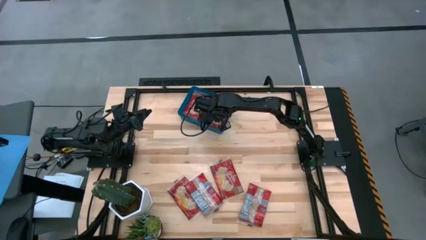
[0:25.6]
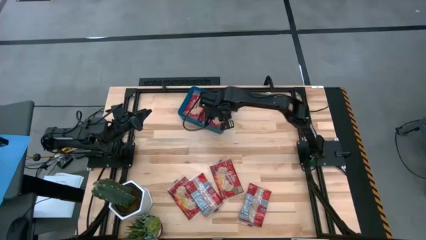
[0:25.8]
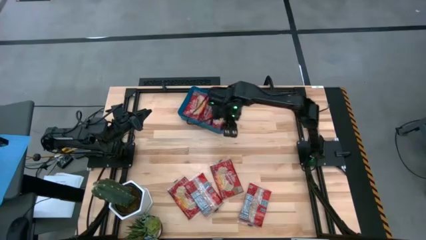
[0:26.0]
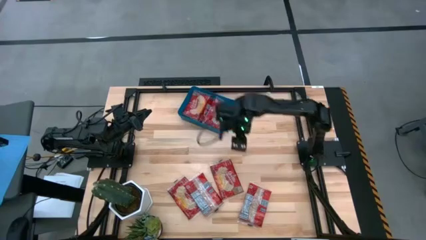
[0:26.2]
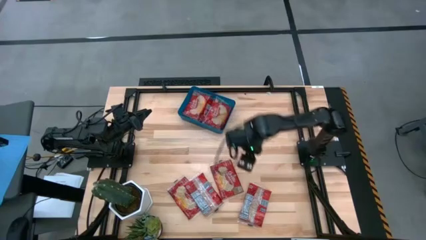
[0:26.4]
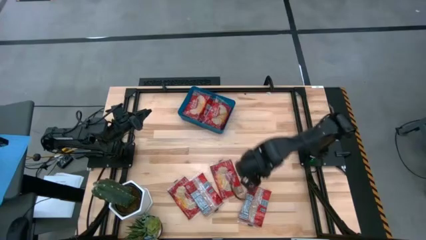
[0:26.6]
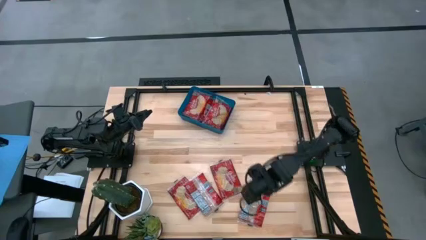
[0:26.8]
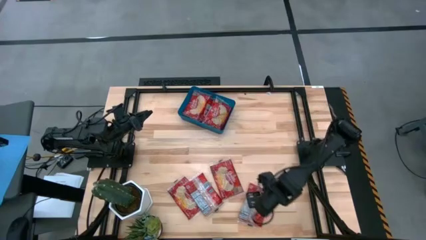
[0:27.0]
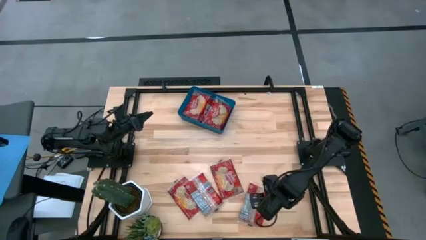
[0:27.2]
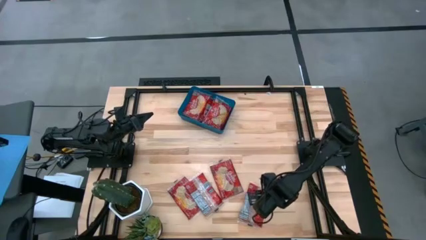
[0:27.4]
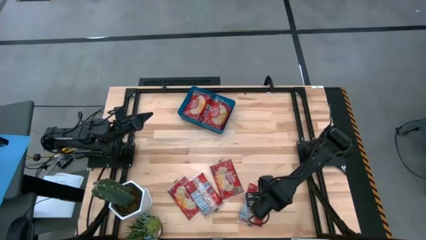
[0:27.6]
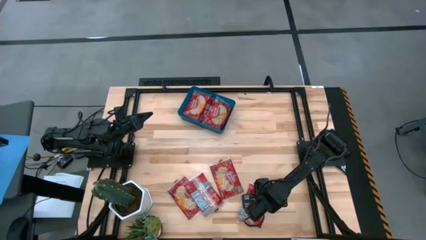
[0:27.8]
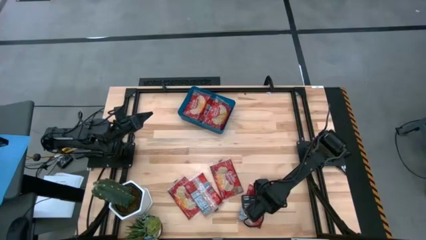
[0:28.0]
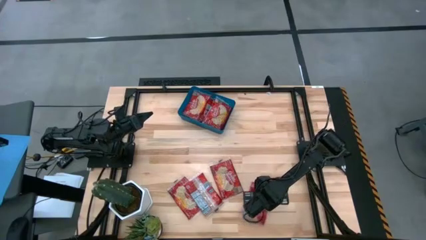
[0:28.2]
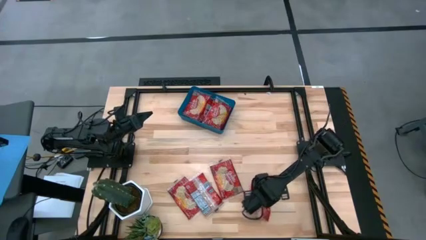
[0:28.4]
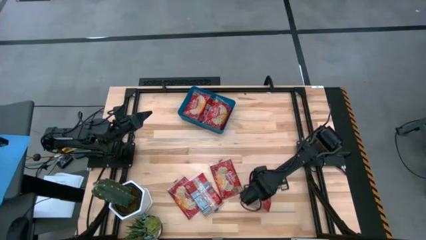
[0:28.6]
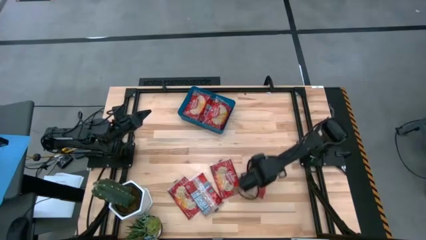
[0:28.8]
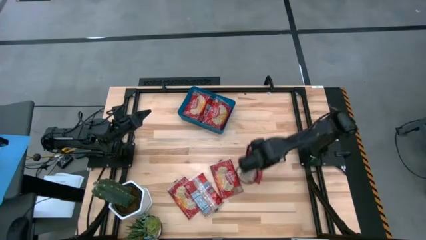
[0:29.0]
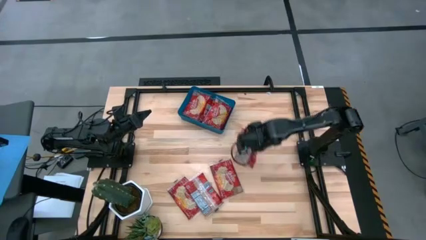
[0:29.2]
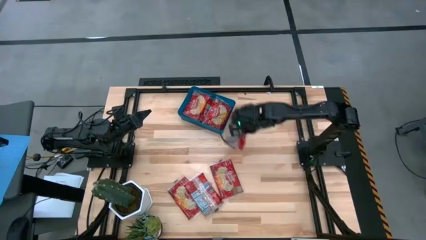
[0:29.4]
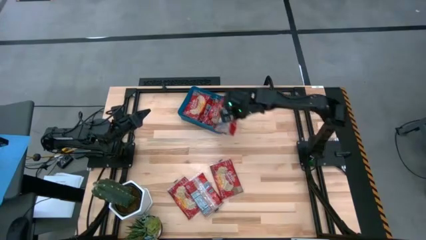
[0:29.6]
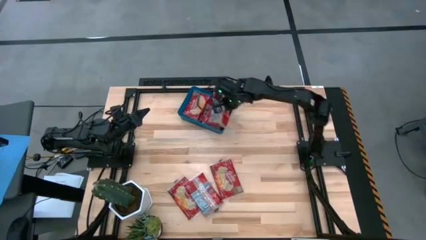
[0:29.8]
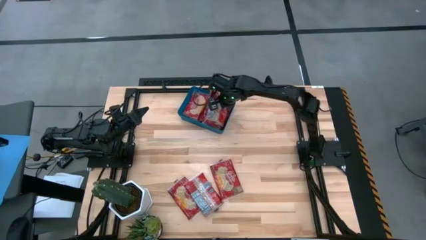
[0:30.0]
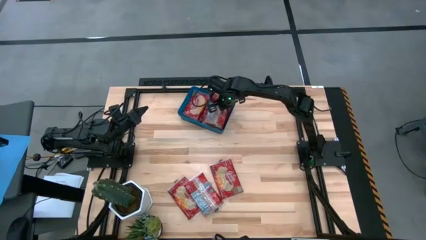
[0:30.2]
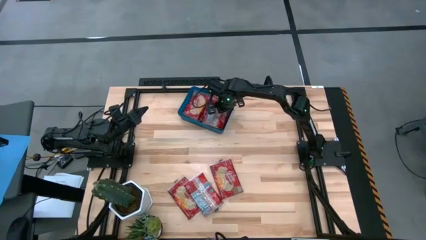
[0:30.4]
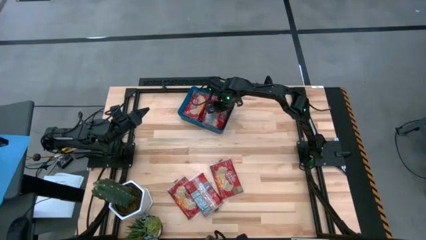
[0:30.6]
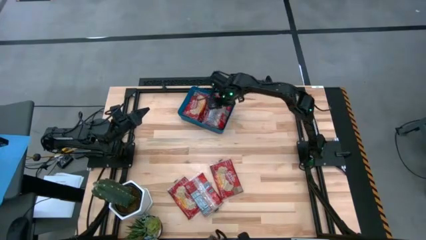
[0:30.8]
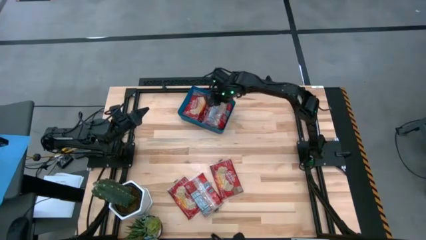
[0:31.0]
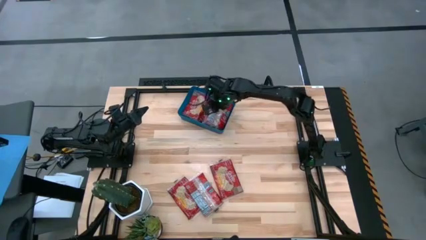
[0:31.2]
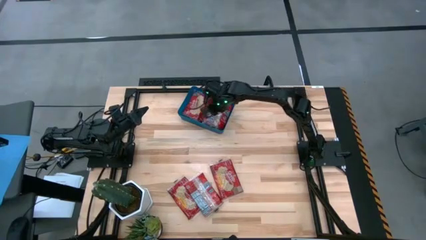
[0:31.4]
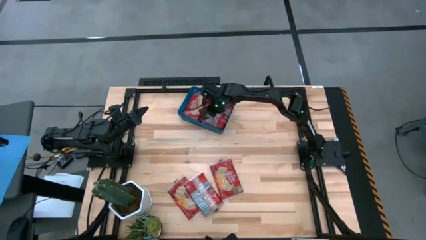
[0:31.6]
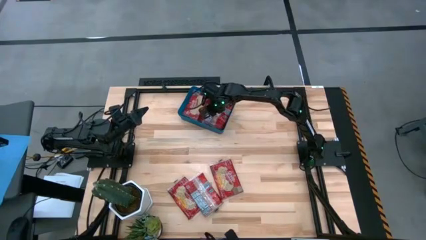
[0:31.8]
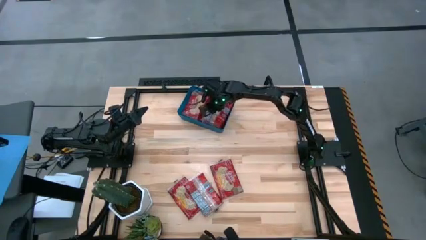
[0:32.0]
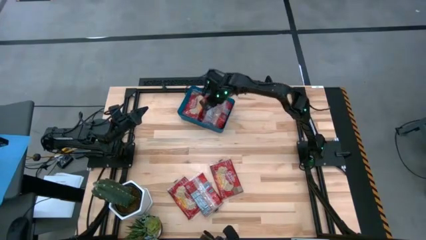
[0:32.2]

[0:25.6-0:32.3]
Task: Sort popcorn bags into baskets
Put the red popcorn bag into the blue bin

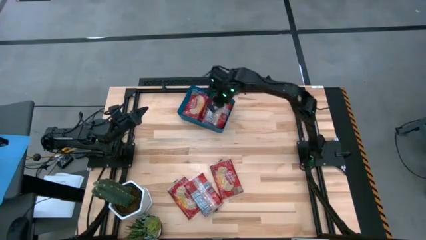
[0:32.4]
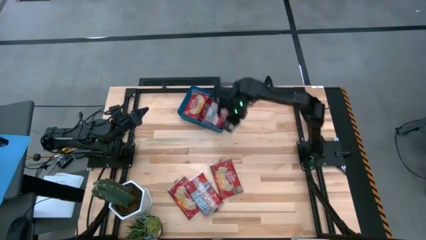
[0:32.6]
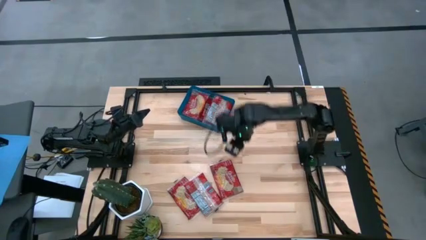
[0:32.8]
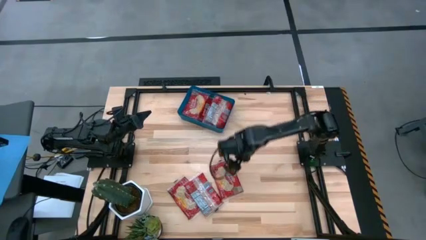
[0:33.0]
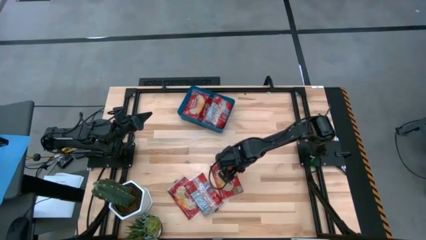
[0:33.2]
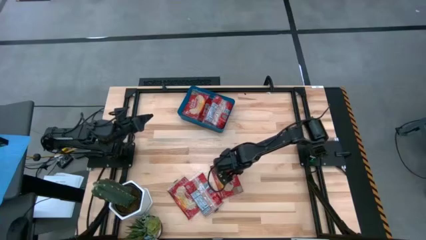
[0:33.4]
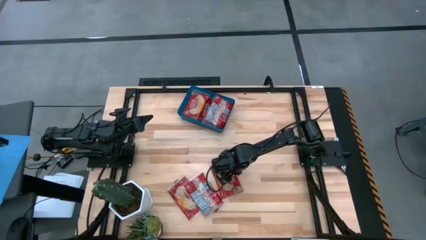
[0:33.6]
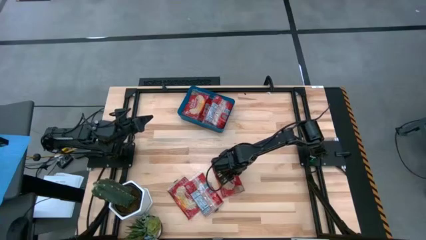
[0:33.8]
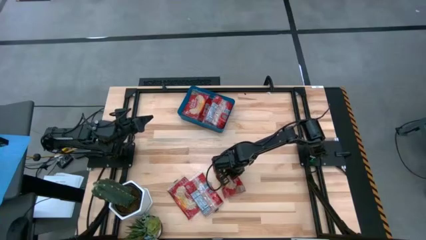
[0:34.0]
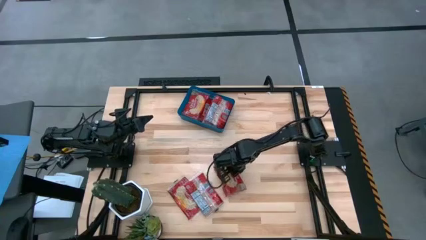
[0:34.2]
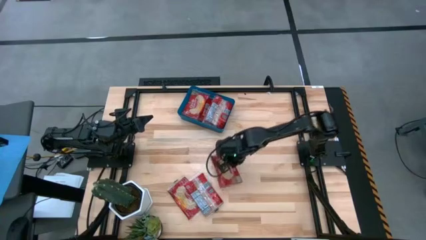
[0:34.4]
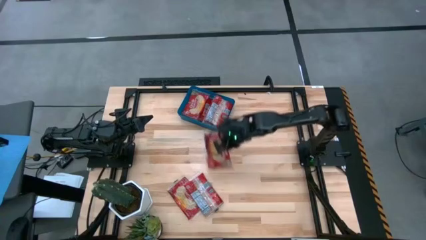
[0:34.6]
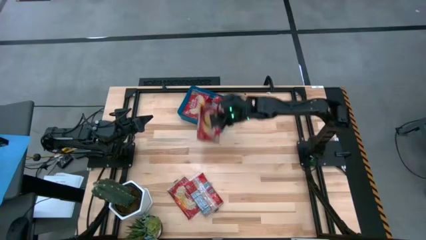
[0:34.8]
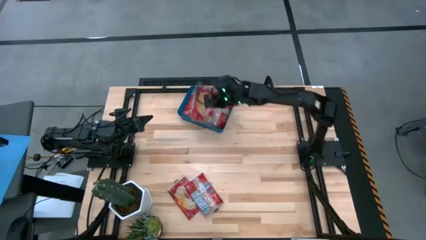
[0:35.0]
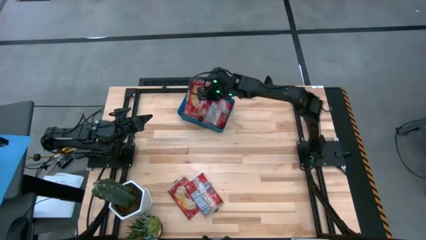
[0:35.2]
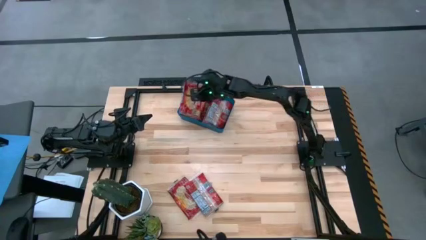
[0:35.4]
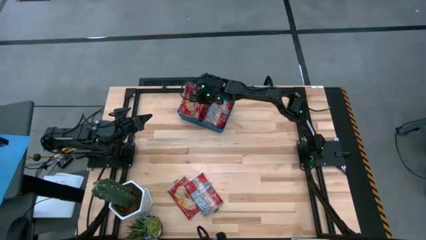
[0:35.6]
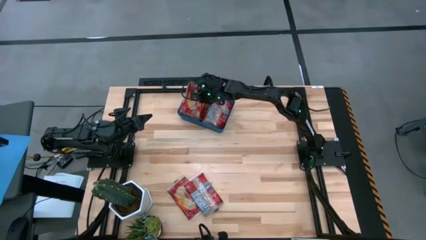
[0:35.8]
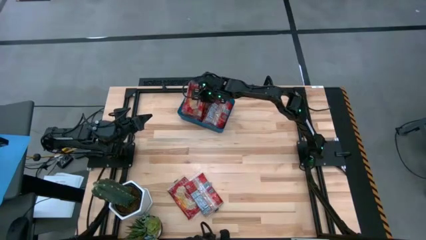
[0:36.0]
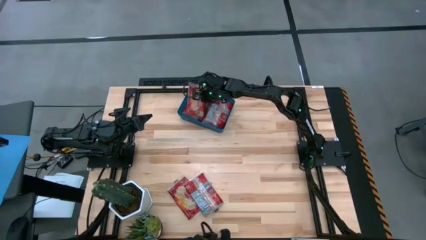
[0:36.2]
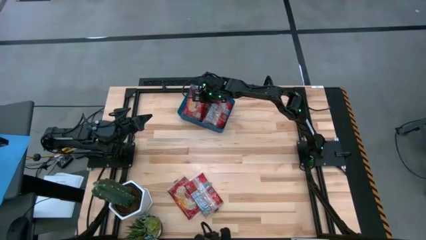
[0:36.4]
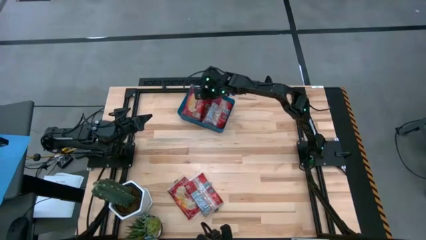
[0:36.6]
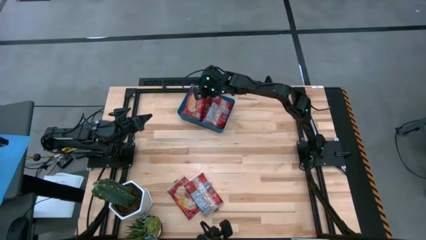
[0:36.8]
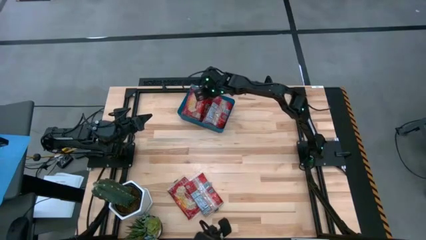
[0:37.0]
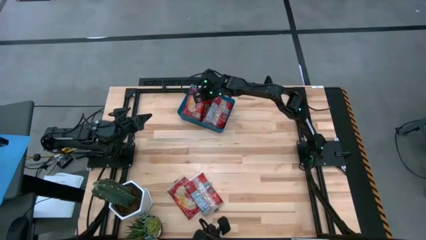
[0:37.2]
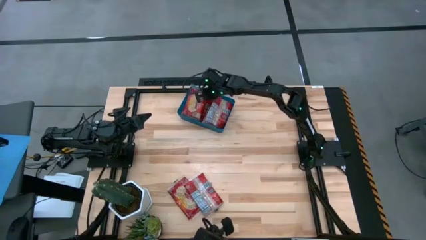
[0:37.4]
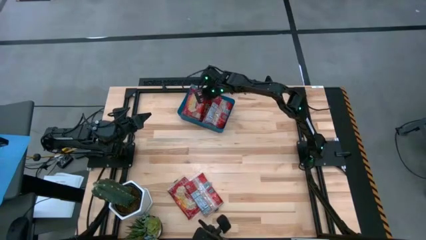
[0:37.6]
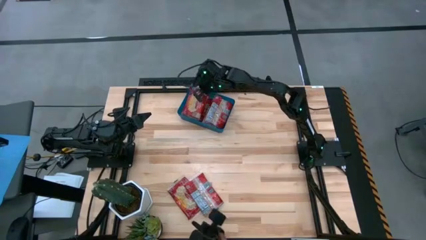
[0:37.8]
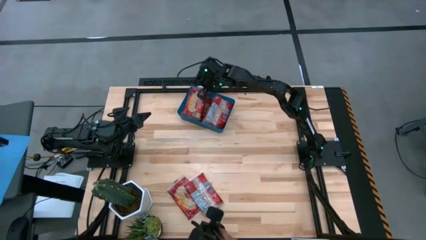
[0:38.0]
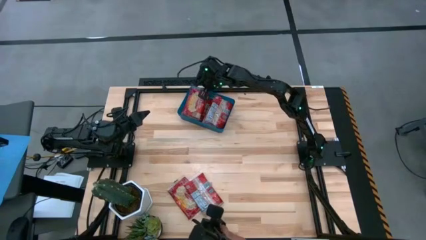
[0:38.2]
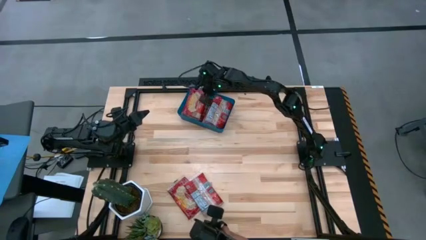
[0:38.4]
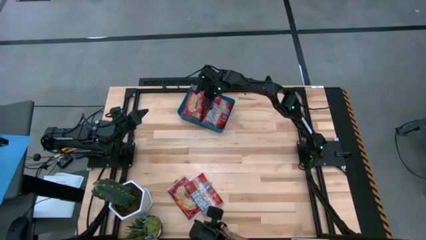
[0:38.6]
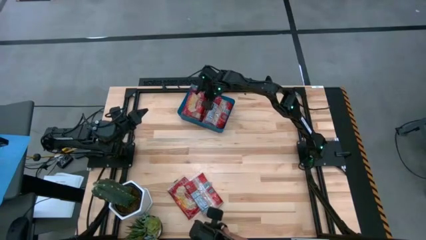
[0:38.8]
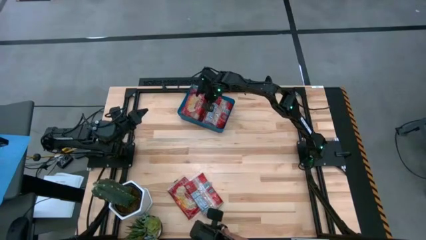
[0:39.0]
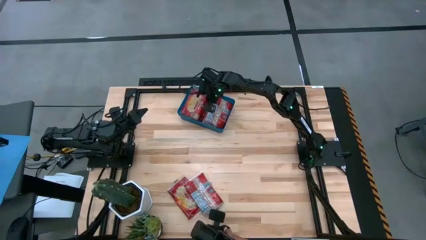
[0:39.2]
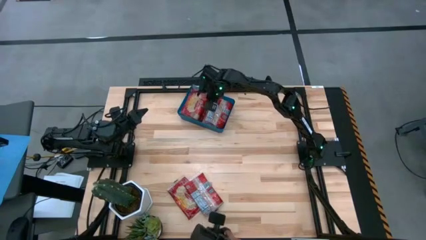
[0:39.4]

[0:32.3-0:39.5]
Put the red popcorn bag into the blue bin

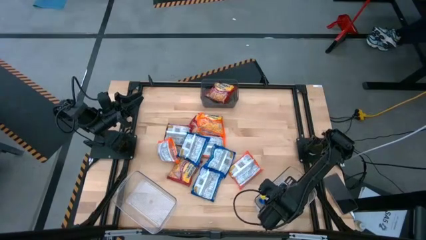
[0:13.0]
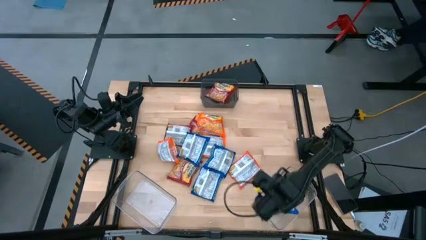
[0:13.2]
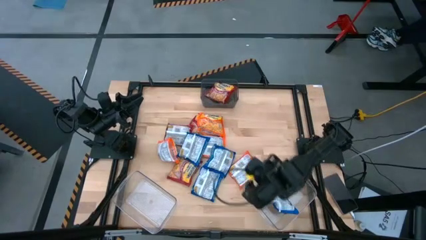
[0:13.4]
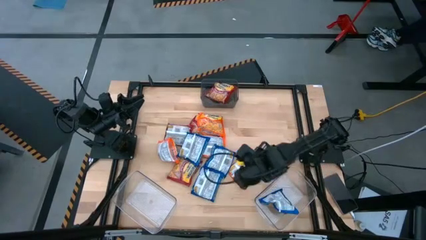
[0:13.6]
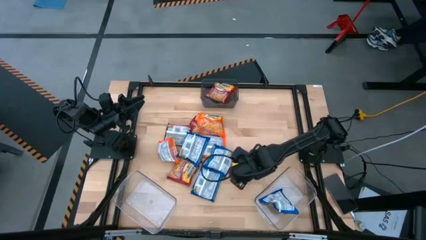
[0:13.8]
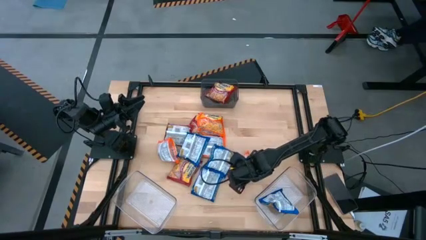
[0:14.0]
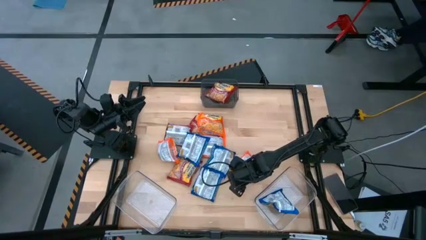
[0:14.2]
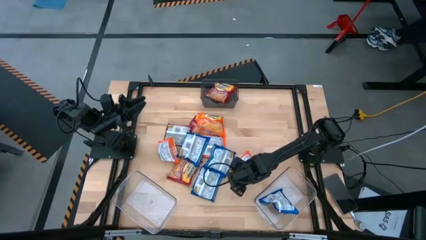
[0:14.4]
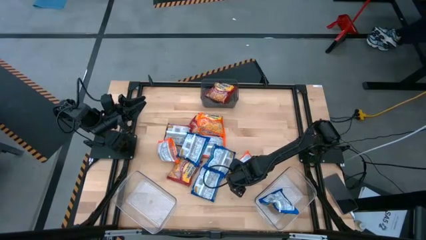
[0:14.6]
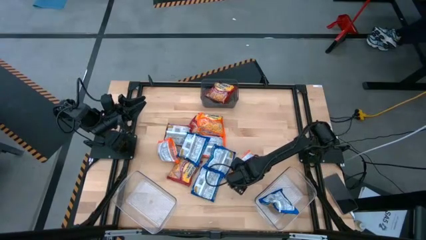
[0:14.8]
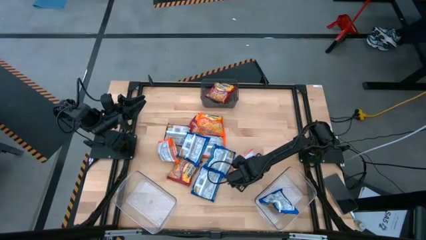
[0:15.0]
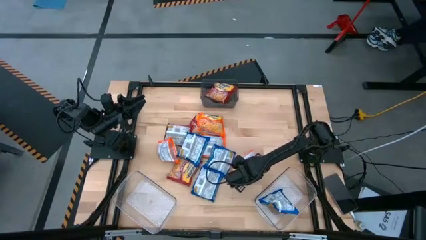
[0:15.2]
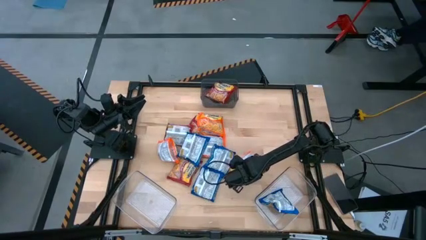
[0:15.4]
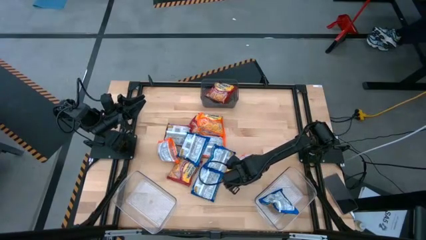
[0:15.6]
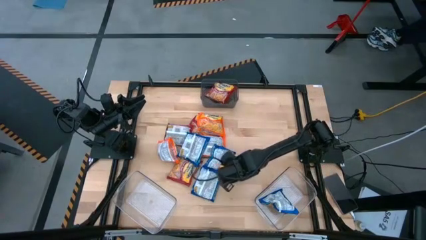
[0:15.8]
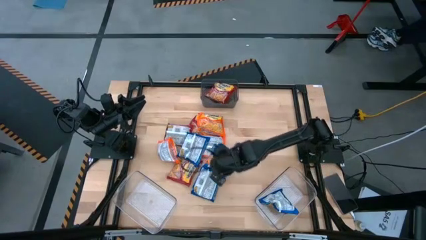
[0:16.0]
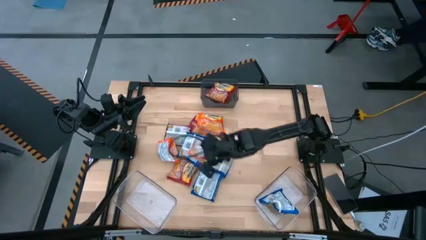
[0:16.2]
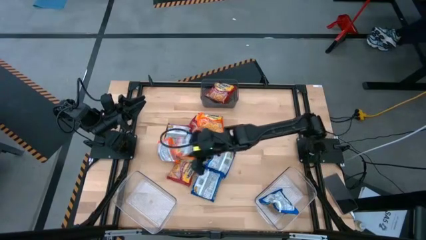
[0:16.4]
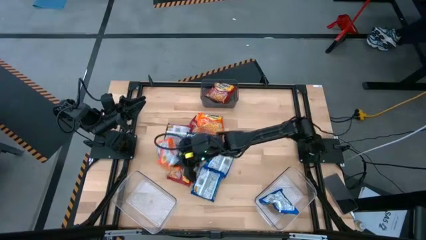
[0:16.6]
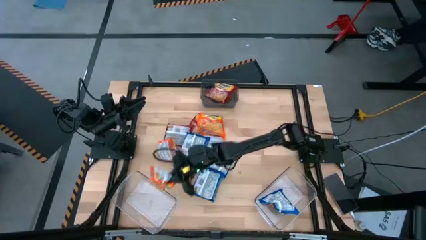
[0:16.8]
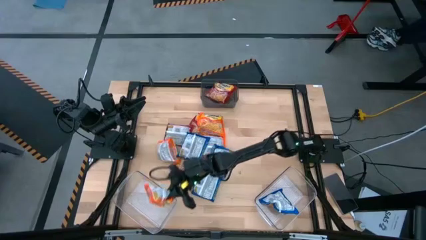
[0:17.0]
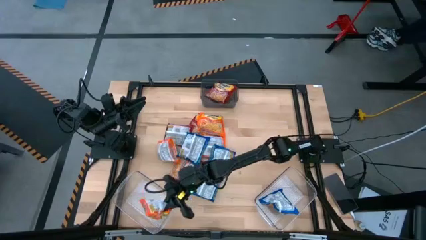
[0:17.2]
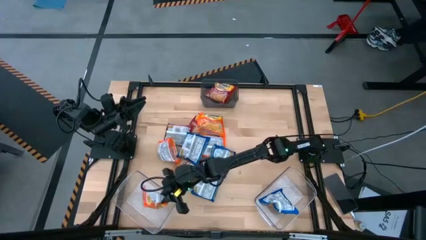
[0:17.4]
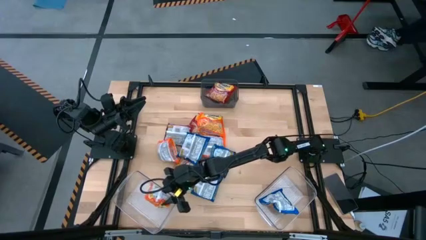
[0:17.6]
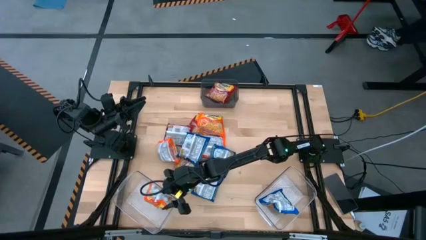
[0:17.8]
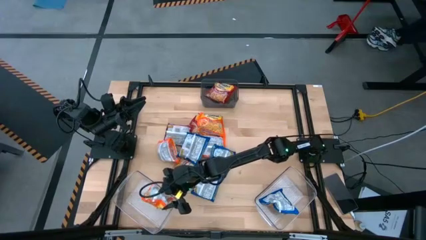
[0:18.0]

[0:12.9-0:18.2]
Task: Sort Maruchan noodles
Put the orange noodle pack into the left transparent bin
